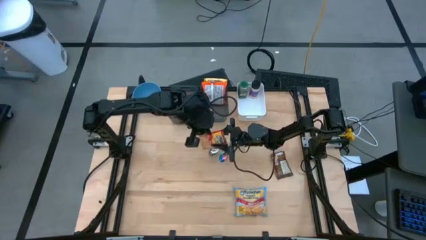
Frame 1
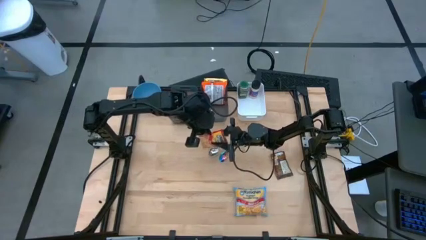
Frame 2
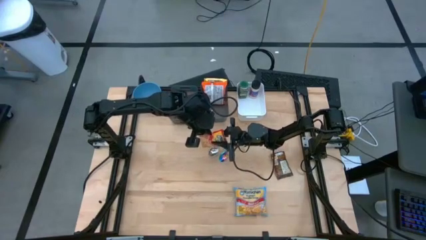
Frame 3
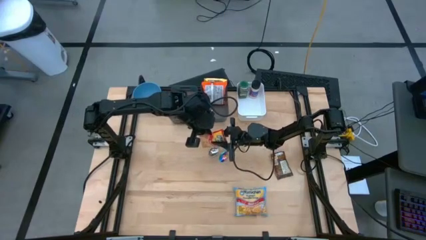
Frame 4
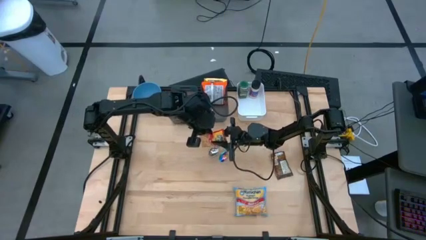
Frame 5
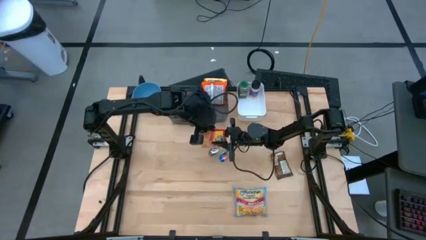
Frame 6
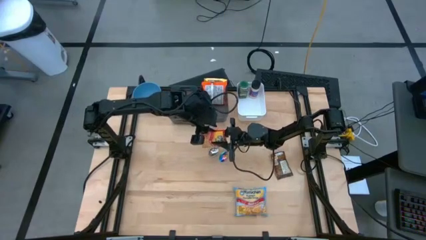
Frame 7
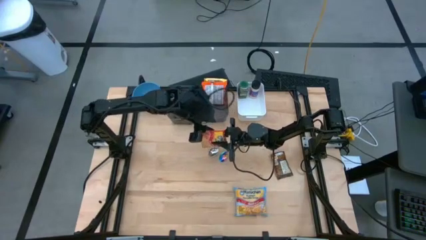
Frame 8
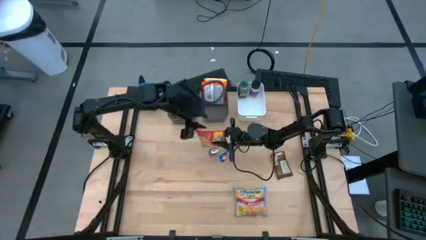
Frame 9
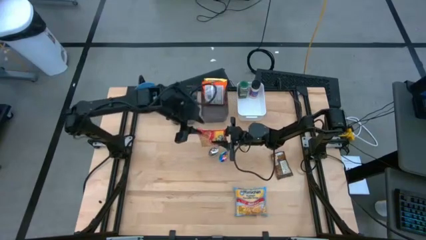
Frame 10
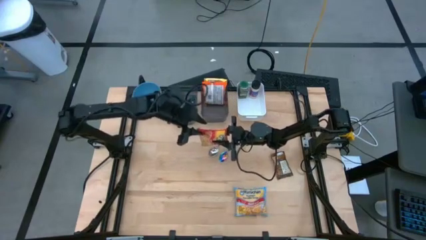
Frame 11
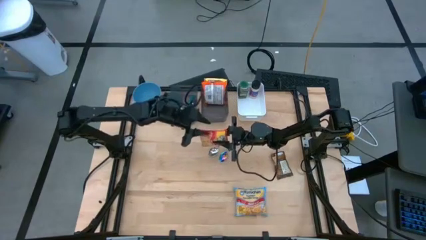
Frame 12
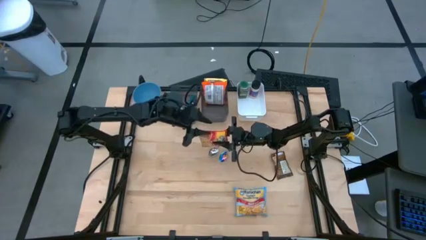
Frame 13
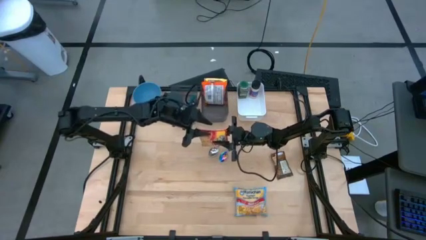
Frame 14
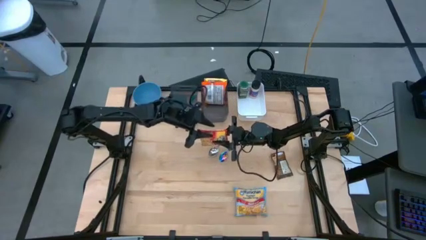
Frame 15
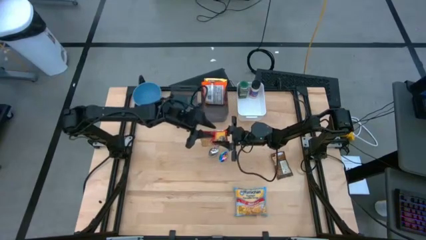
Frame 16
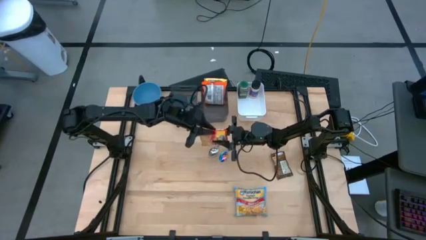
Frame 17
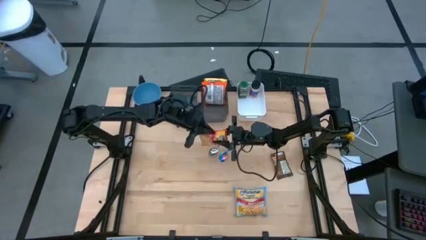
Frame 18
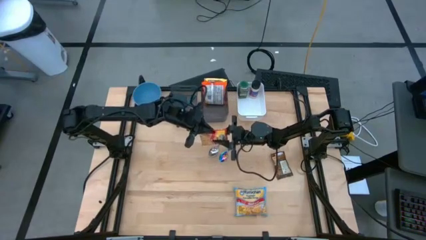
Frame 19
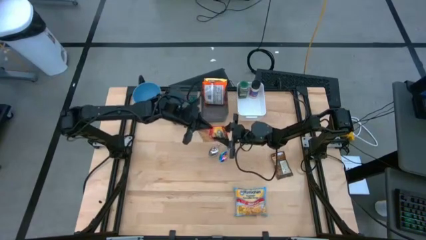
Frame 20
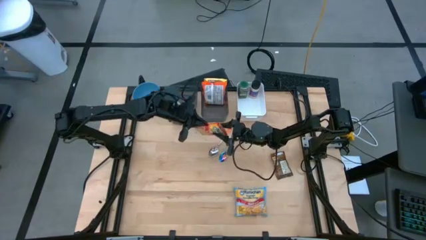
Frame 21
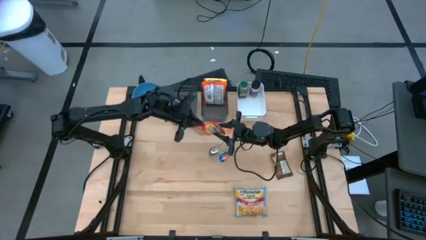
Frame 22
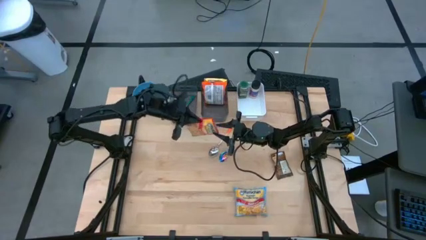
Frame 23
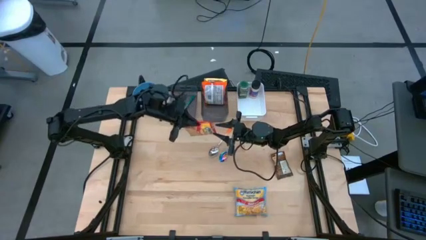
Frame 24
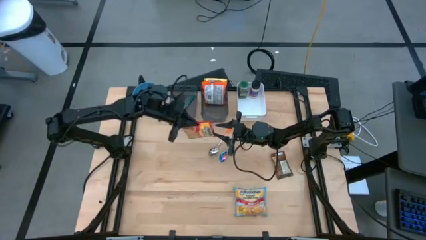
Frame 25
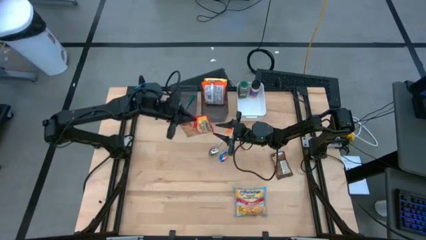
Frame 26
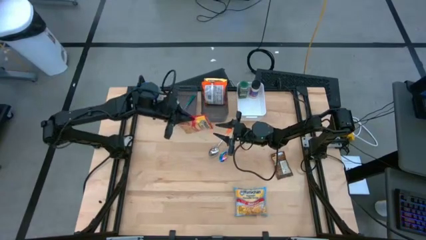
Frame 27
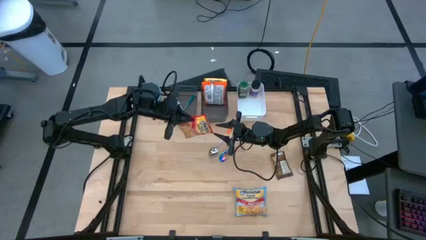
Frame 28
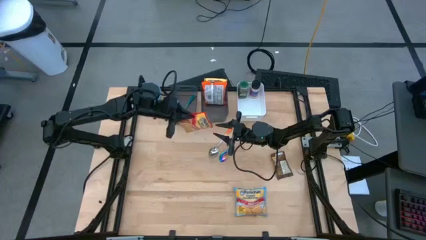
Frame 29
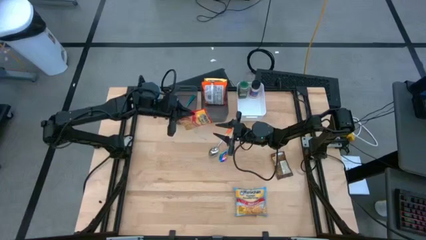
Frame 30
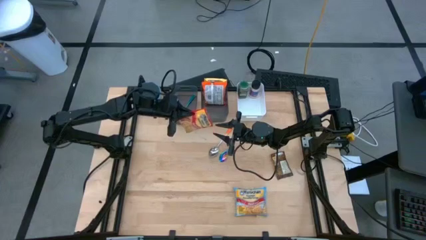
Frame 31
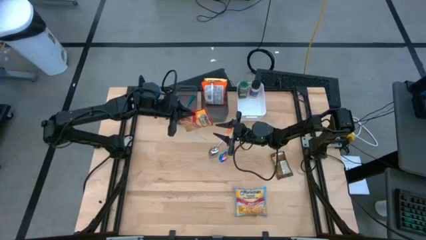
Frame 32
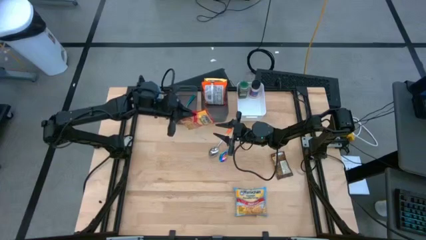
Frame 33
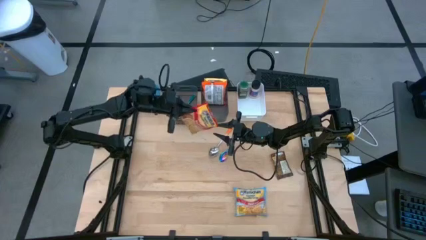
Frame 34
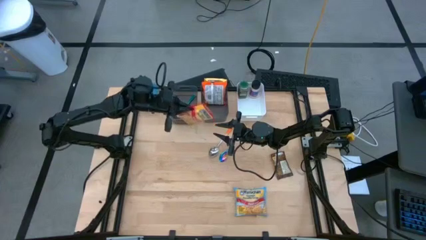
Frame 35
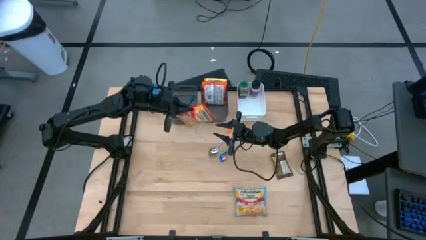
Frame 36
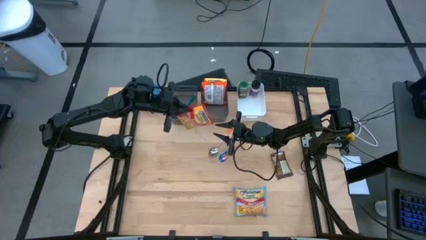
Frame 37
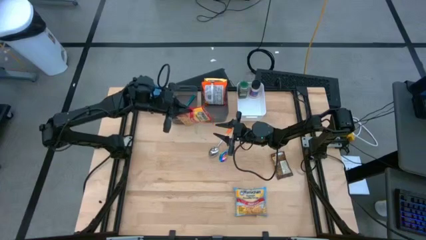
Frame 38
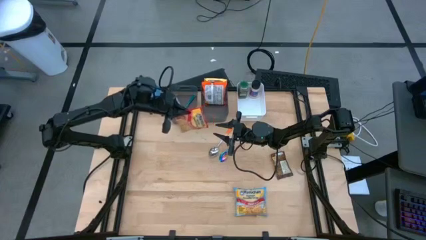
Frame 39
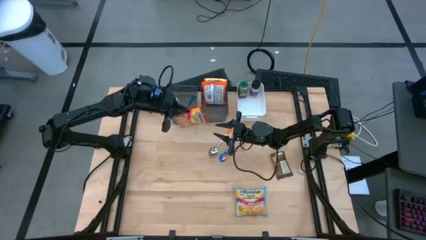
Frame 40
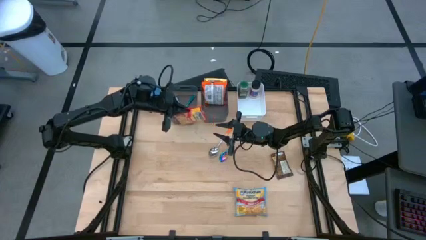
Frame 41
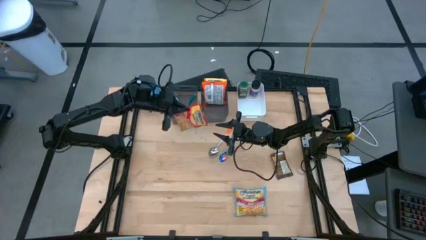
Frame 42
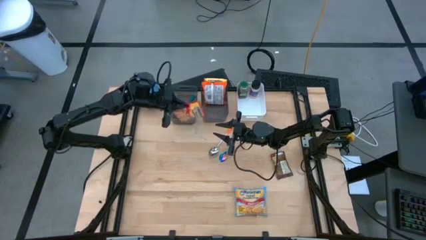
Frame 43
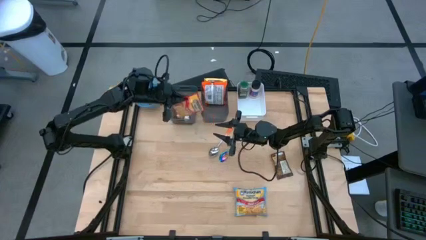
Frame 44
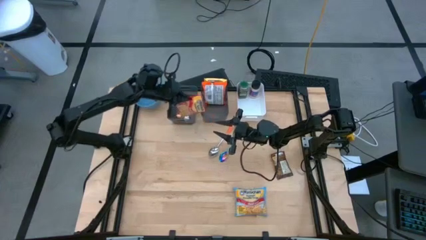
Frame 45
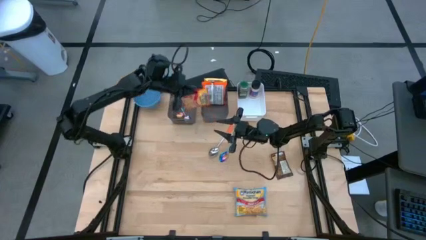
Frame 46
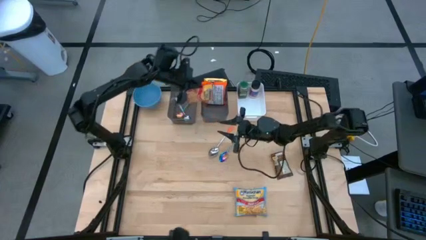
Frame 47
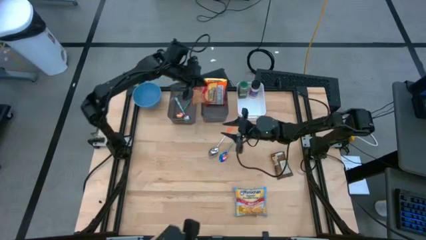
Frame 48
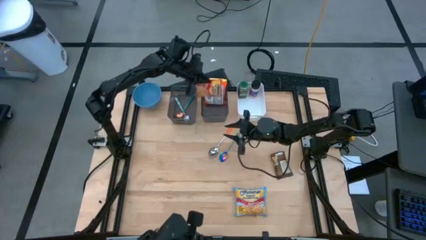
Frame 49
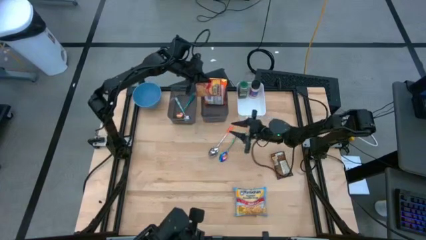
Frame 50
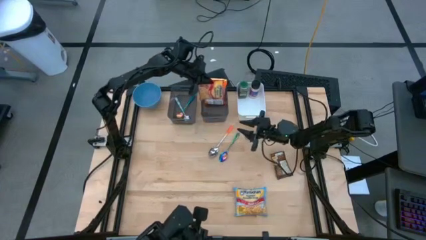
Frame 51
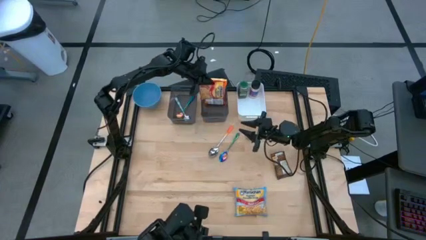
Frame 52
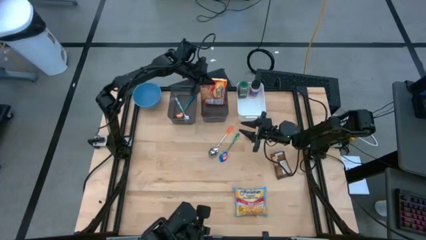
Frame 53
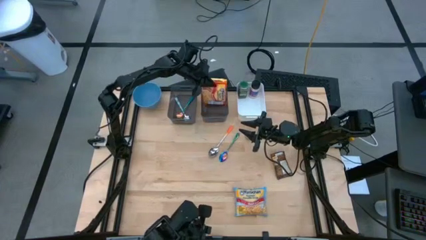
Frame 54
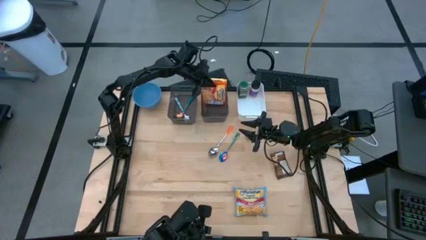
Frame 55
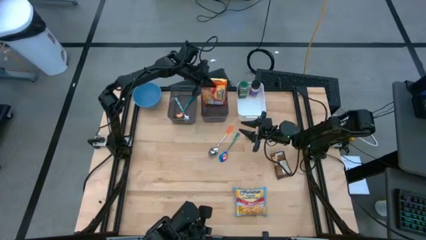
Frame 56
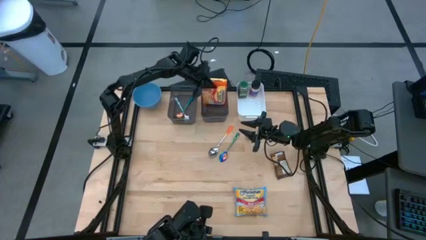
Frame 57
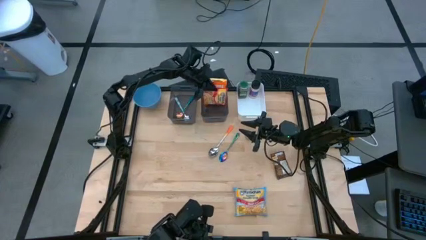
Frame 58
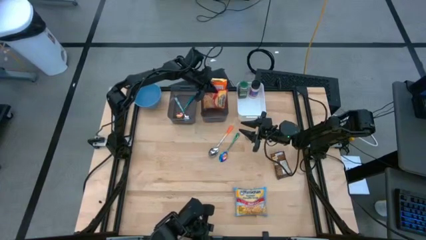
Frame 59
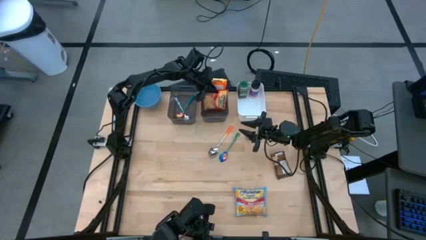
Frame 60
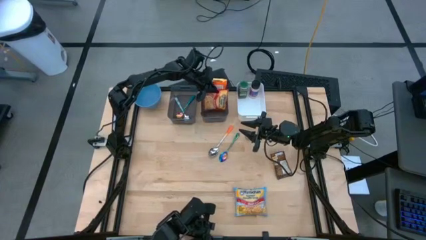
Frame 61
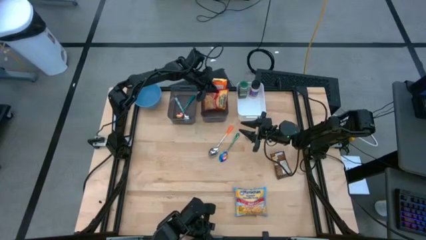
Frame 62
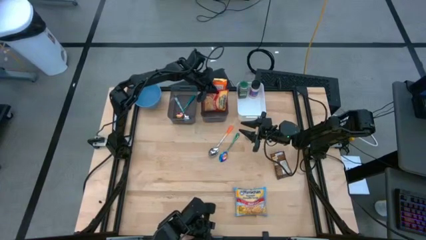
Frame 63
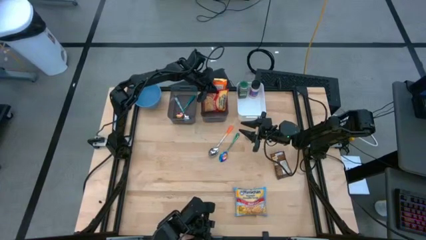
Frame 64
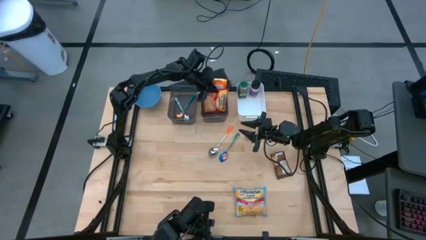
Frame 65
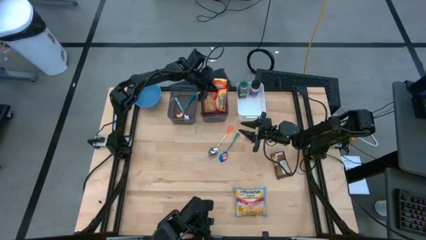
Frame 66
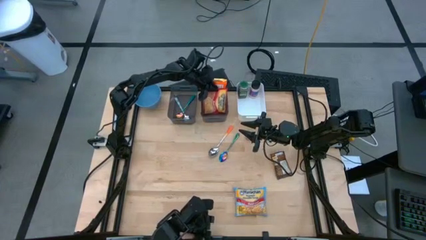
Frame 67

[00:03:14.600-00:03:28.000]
Task: Pick & Place Food Item
Put the red noodle pack into the right black bin

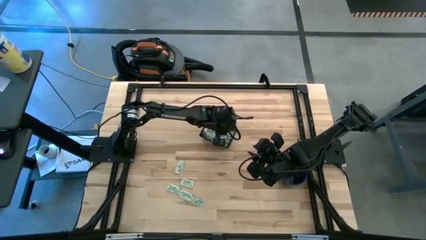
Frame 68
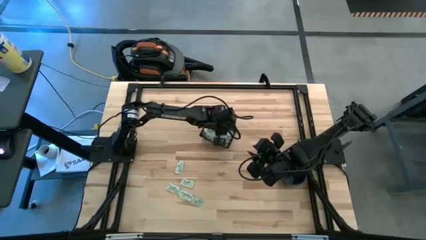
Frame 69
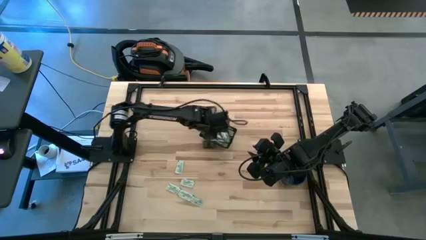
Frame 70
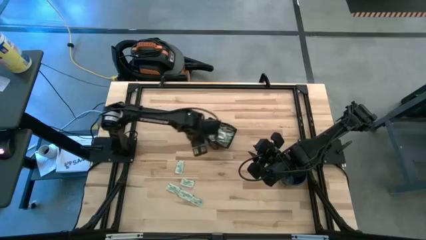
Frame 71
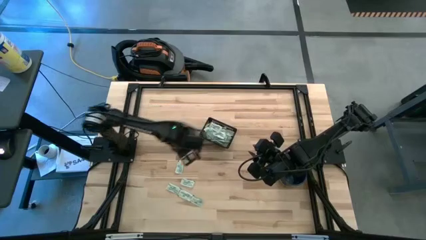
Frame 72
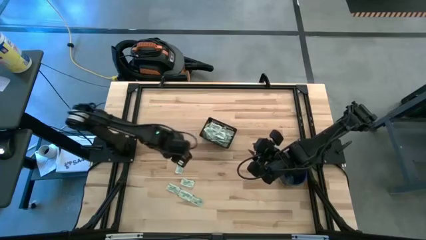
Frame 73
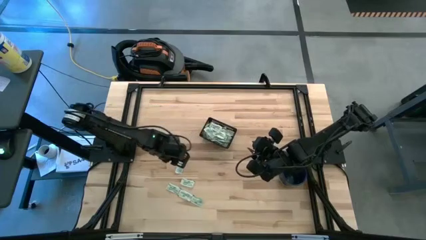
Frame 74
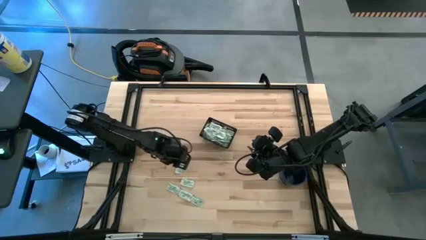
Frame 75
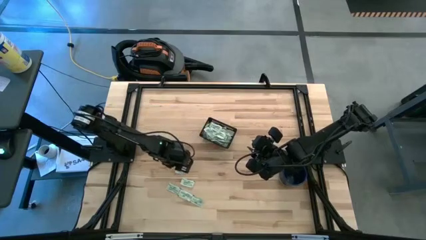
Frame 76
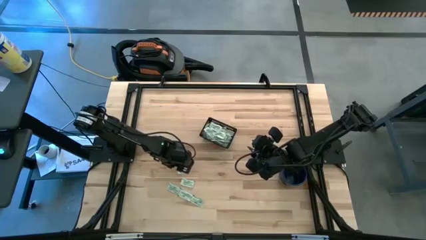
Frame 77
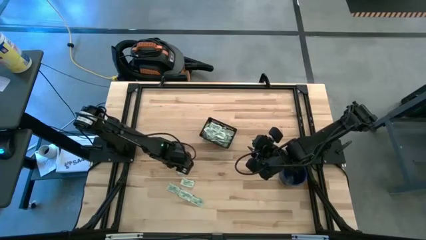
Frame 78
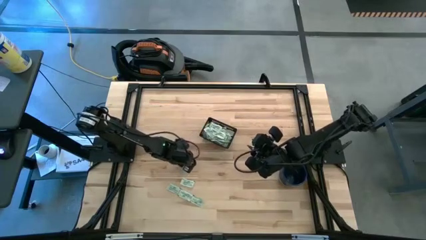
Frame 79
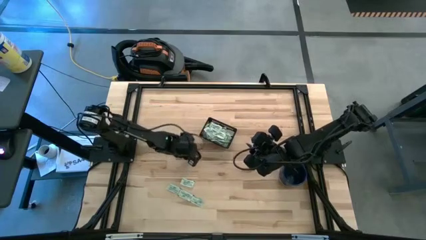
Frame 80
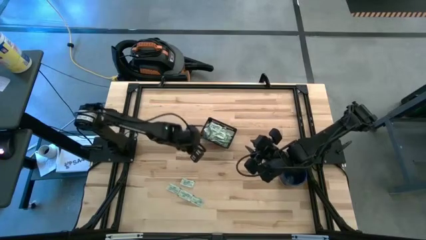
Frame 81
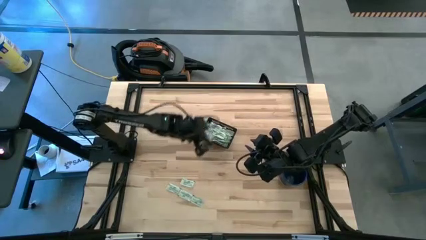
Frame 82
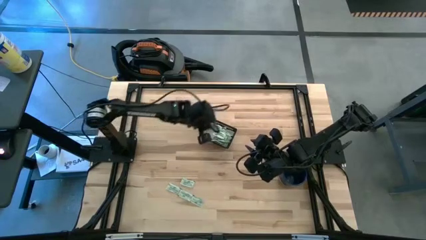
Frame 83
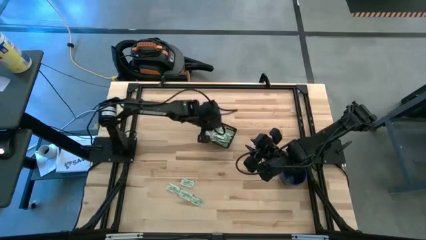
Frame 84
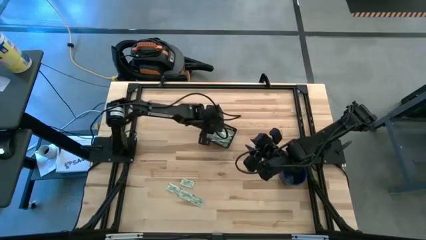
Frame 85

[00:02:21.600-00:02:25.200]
Task: Pick and place Stevia / Truvia into bins
Put the stevia packet into the black bin
